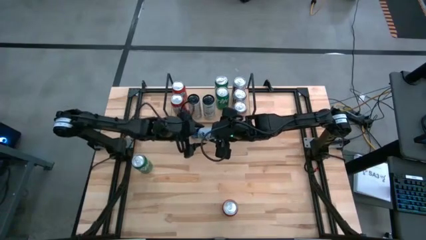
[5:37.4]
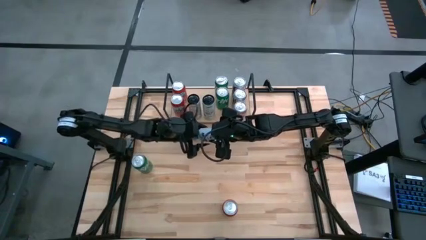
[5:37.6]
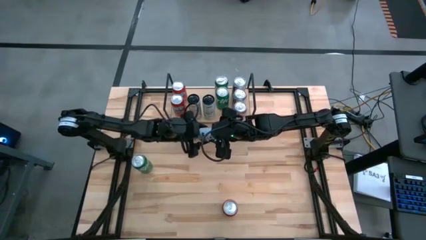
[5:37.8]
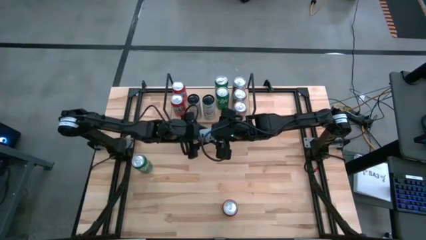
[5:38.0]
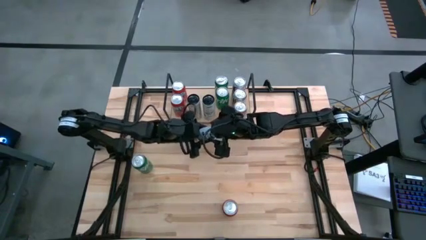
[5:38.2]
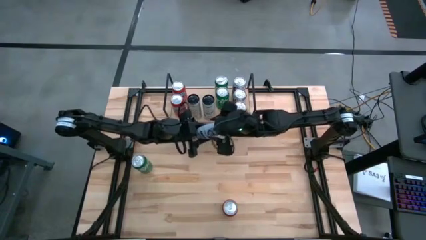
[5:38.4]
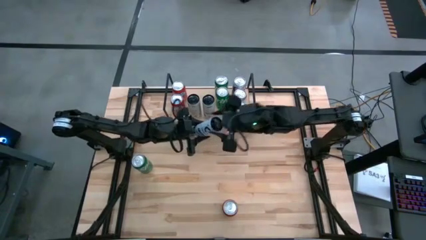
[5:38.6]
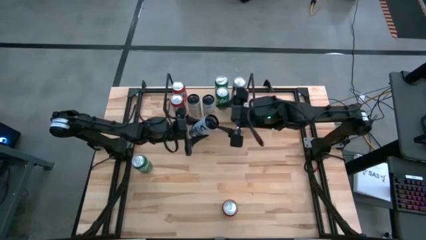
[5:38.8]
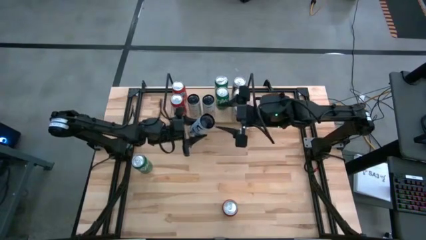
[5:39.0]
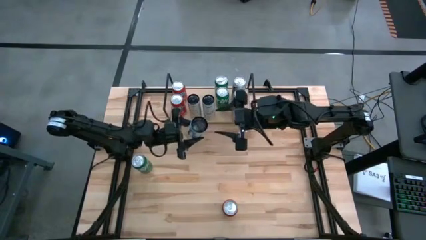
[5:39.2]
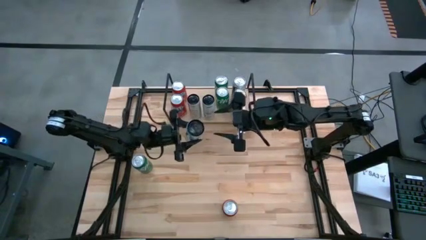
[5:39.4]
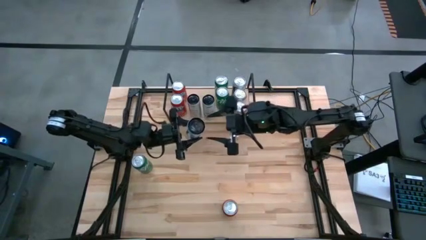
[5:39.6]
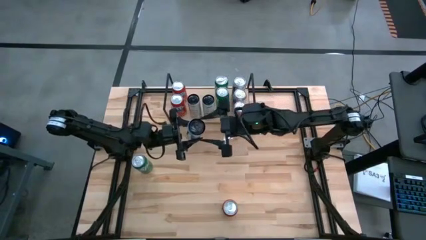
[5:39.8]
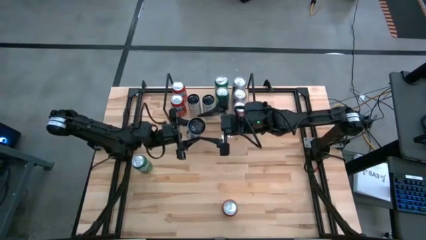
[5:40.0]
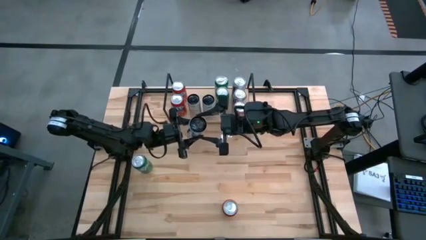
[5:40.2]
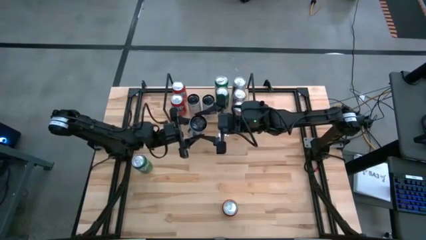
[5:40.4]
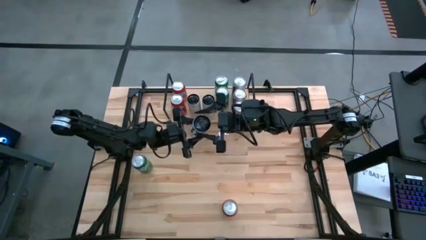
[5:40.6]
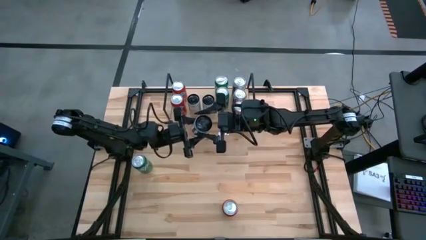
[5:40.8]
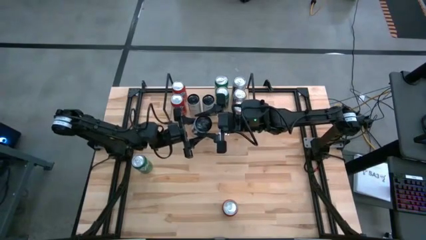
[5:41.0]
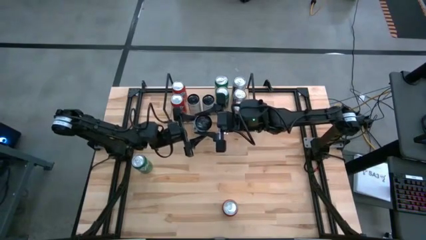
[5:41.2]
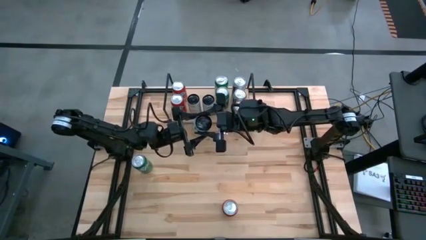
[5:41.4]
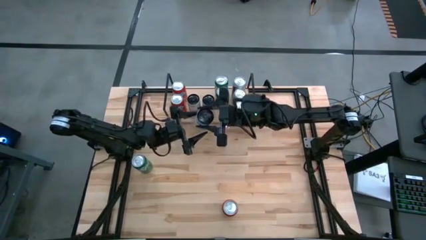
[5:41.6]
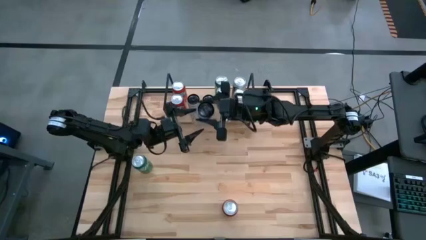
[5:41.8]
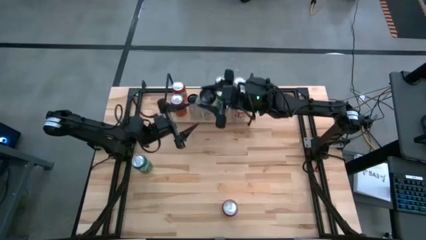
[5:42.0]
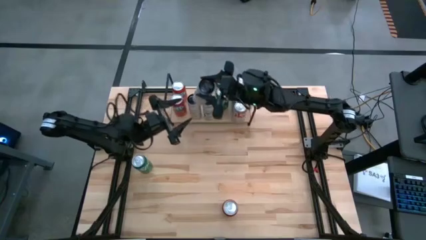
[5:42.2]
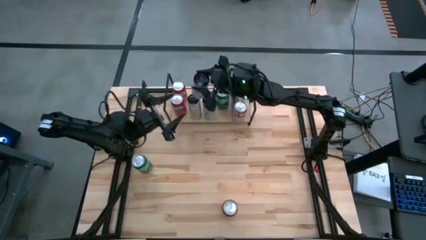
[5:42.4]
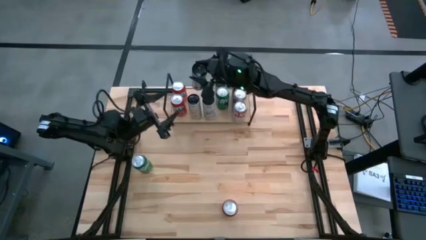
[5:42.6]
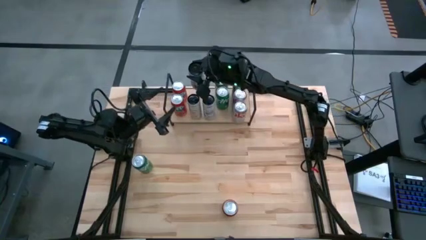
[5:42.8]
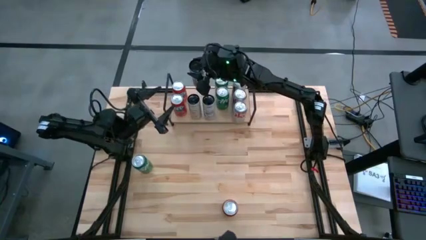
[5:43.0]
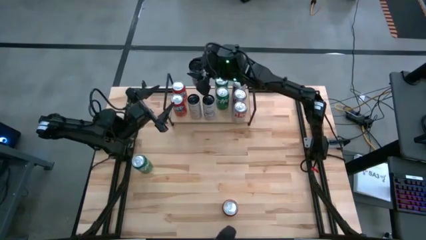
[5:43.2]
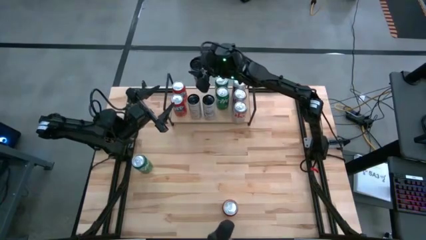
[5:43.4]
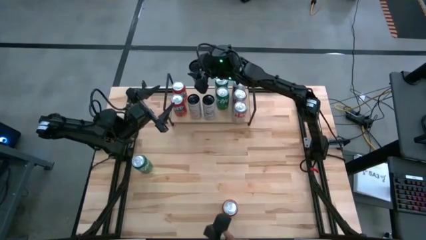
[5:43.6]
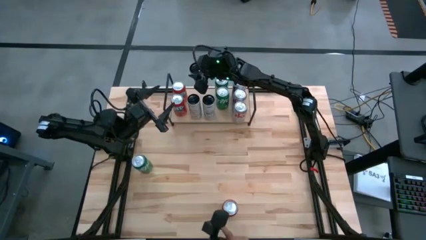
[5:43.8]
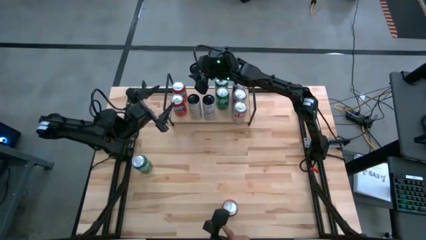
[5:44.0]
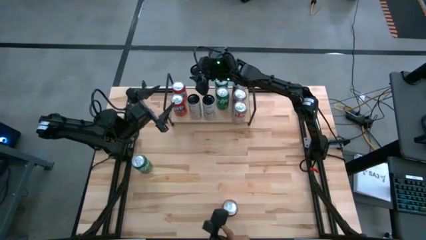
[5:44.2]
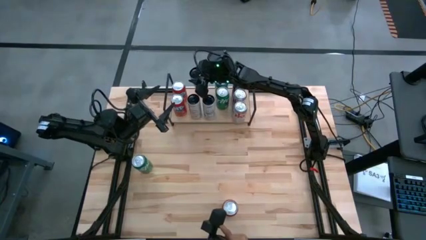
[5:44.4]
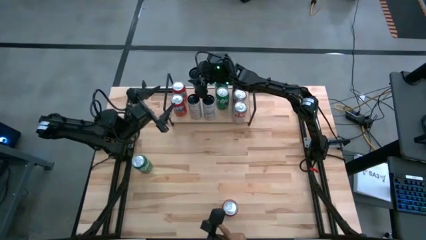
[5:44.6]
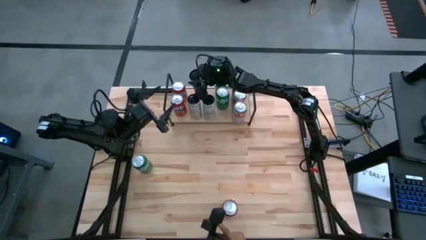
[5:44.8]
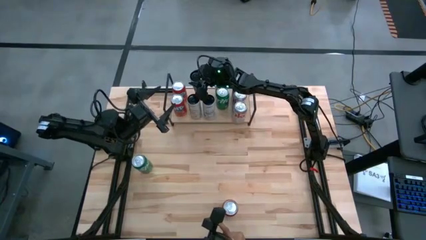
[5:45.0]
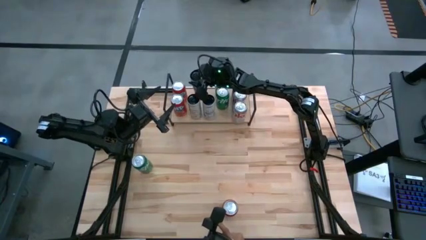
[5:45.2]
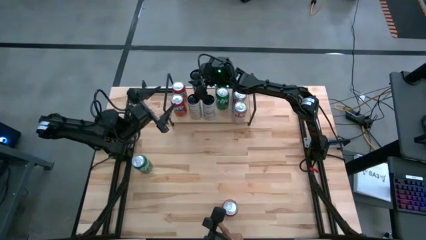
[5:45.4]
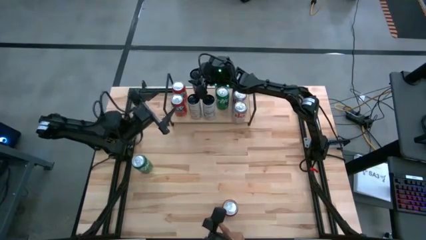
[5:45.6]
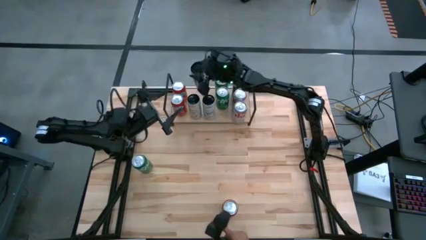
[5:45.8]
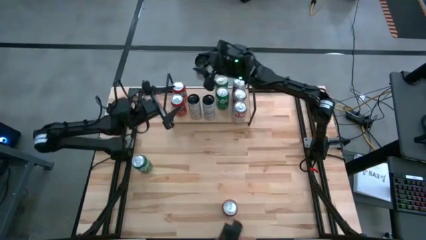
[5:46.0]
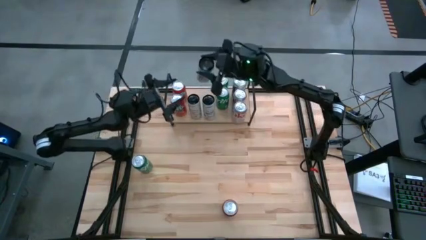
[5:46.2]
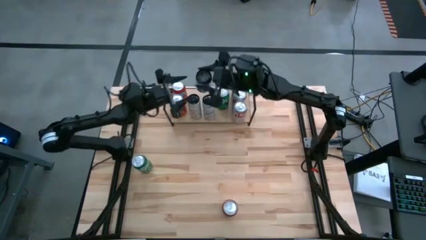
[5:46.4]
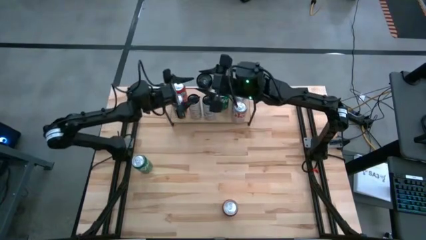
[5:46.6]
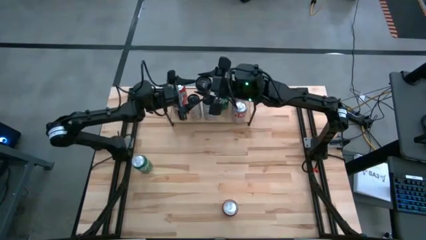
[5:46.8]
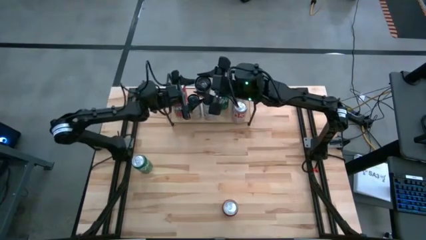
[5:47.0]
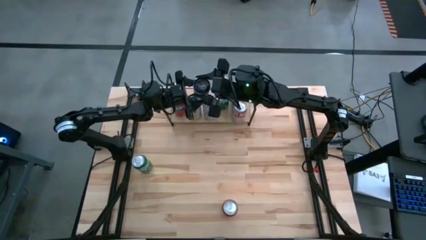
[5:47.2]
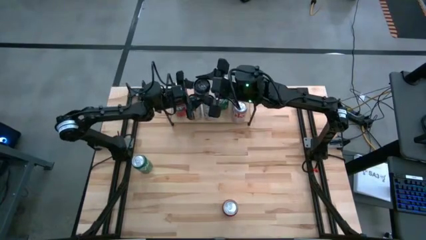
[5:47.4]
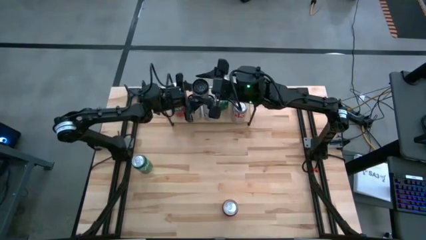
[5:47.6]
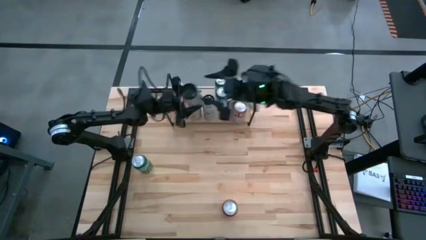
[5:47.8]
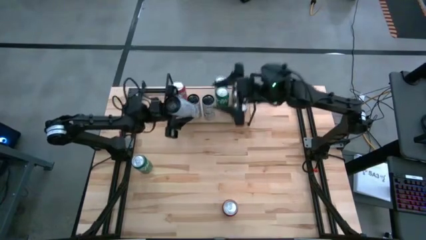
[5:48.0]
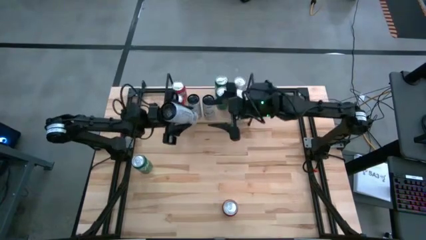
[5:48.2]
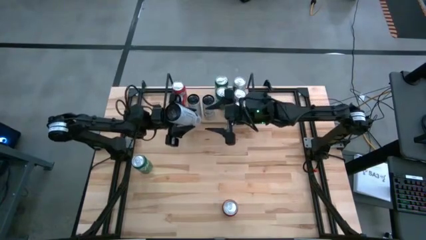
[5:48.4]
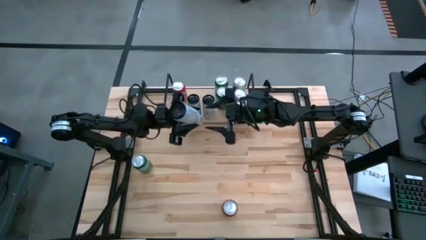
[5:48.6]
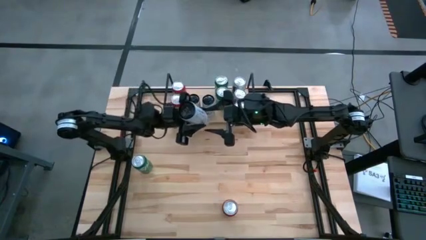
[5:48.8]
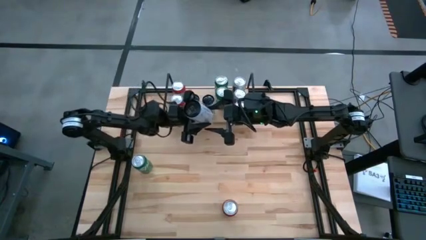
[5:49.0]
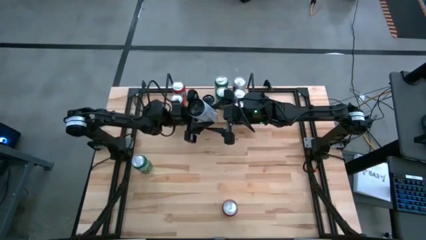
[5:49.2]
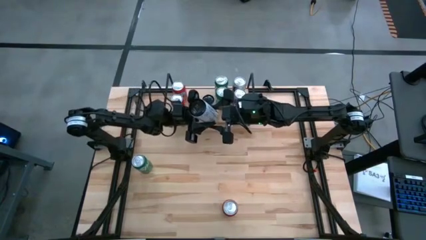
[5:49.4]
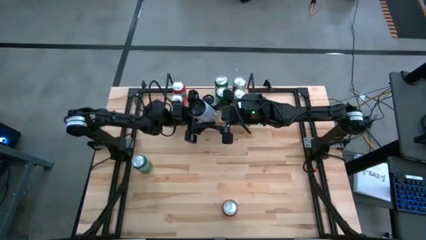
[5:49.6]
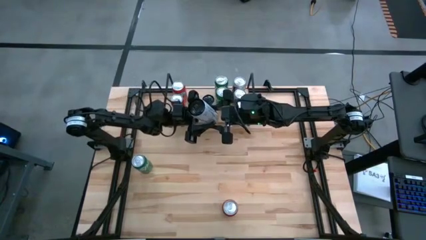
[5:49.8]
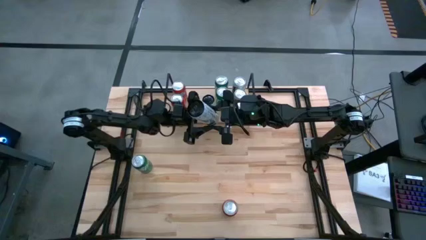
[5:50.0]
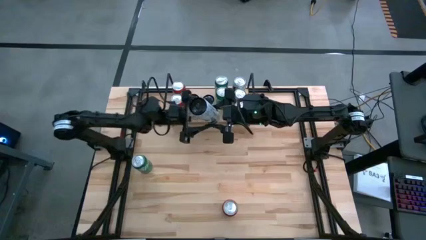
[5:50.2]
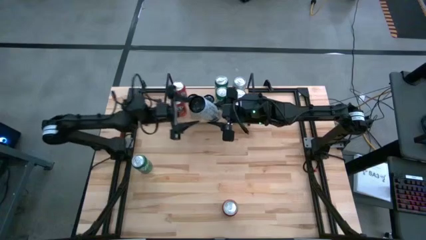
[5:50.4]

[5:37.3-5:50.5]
Task: Sort soda cans
Put the white blue soda can on the shelf and align it with the other white blue soda can
